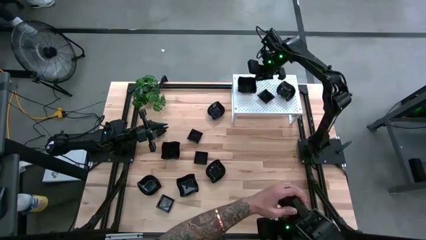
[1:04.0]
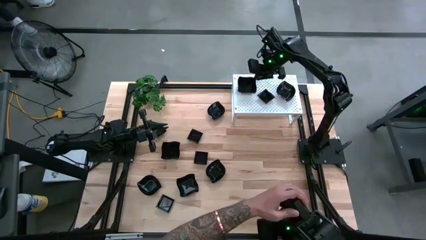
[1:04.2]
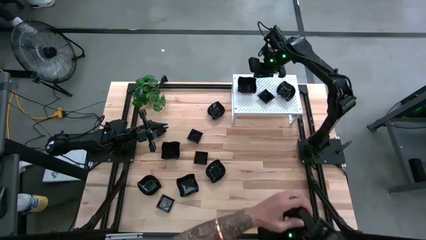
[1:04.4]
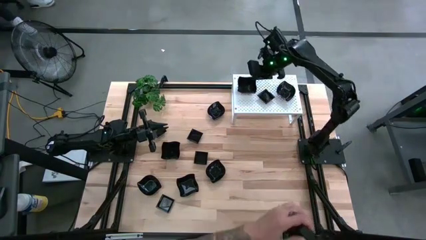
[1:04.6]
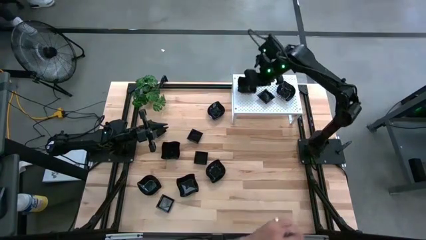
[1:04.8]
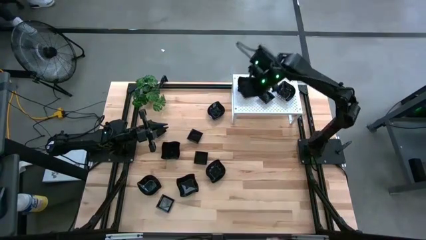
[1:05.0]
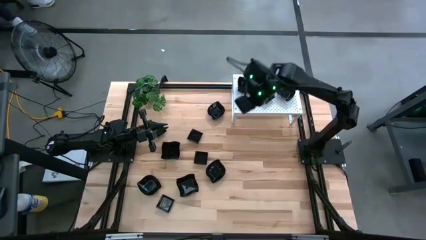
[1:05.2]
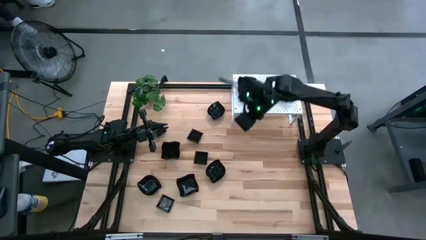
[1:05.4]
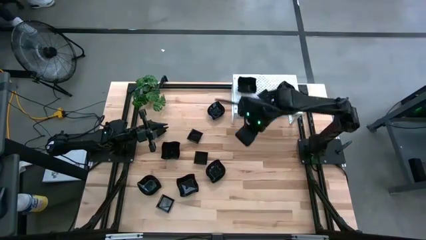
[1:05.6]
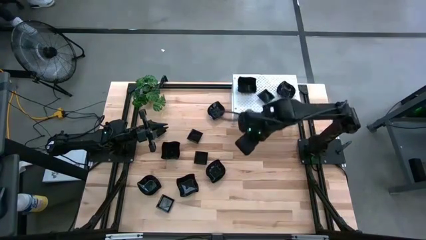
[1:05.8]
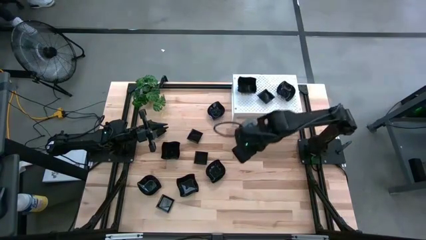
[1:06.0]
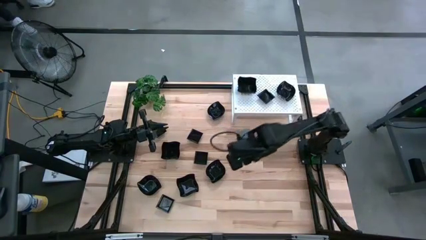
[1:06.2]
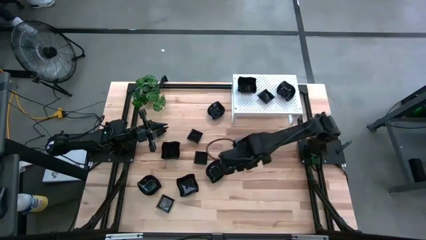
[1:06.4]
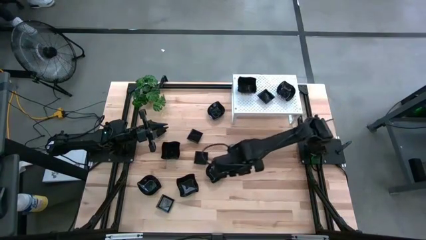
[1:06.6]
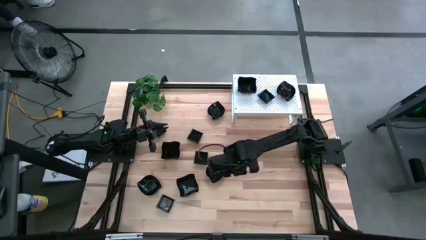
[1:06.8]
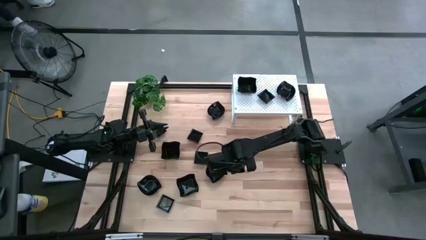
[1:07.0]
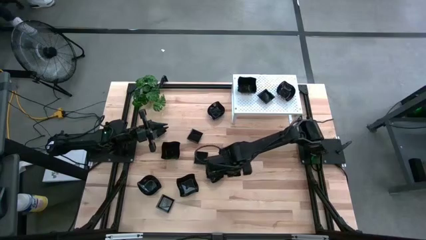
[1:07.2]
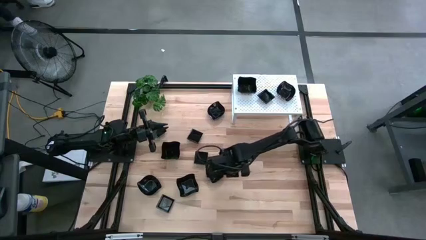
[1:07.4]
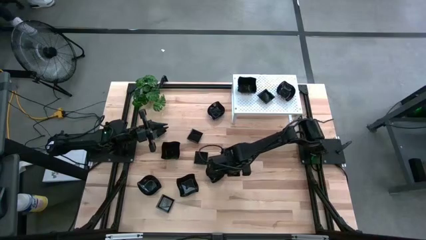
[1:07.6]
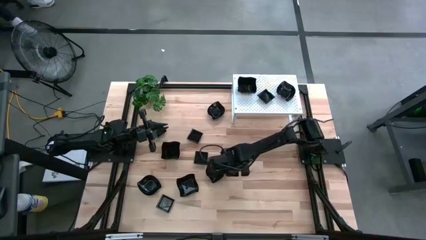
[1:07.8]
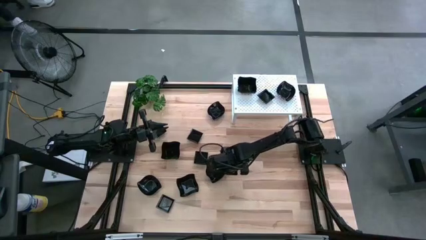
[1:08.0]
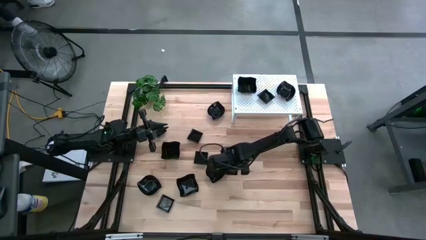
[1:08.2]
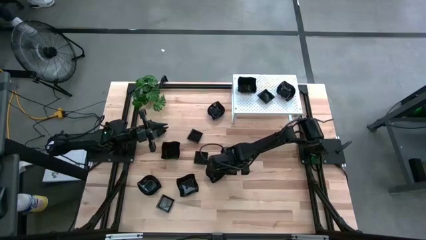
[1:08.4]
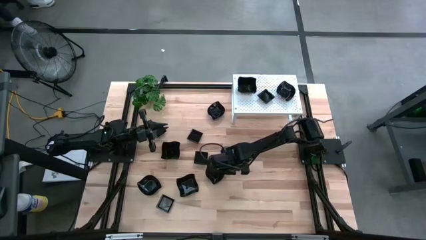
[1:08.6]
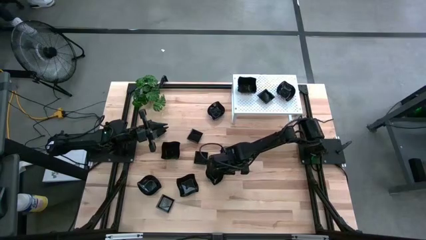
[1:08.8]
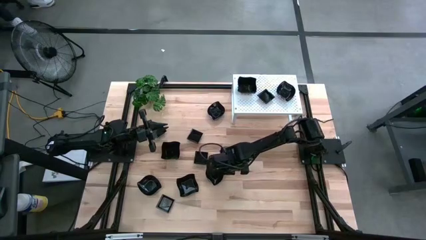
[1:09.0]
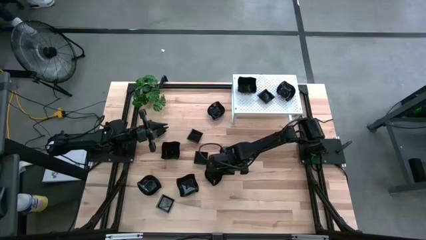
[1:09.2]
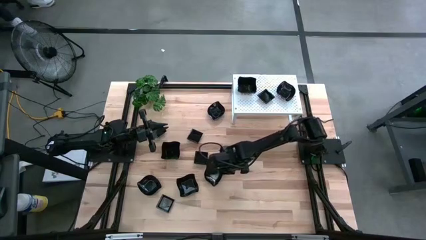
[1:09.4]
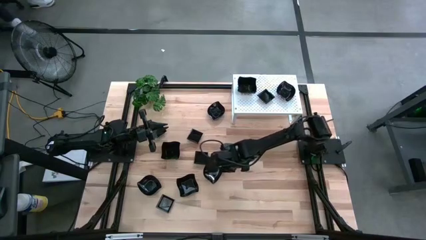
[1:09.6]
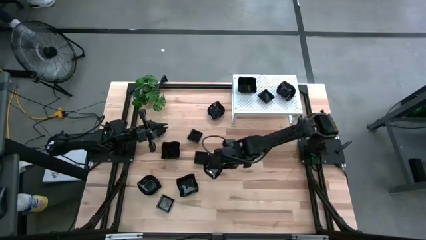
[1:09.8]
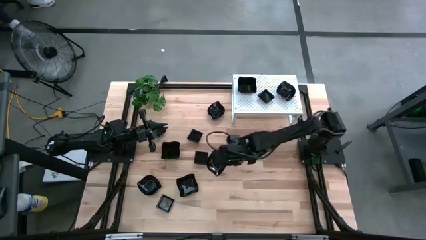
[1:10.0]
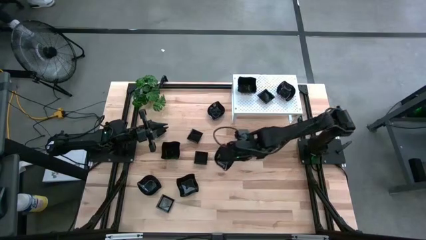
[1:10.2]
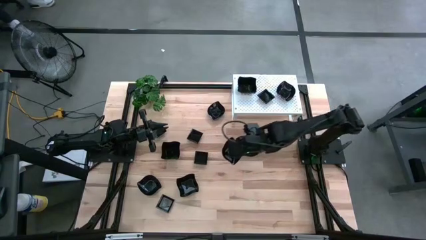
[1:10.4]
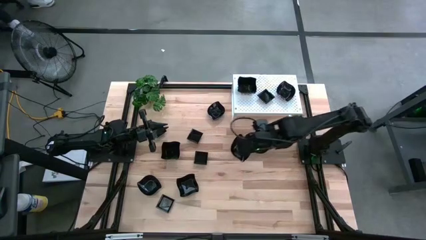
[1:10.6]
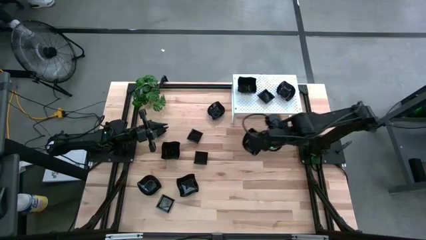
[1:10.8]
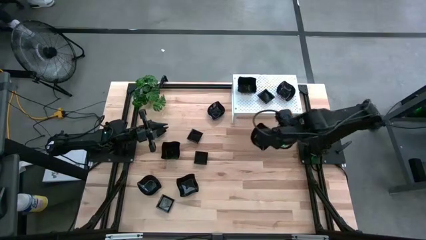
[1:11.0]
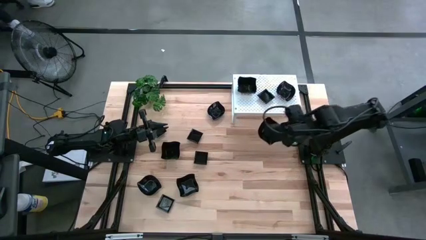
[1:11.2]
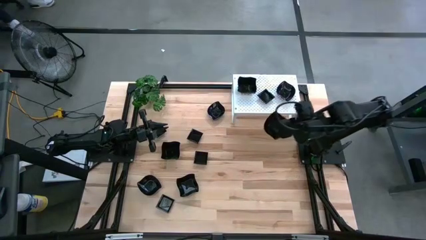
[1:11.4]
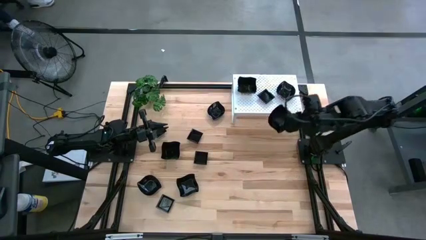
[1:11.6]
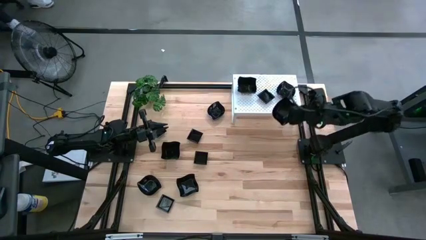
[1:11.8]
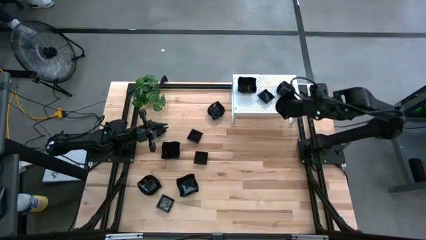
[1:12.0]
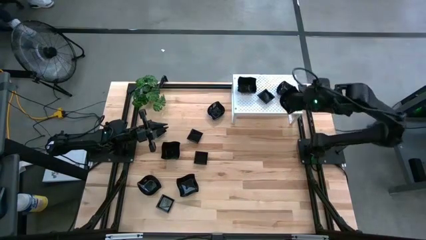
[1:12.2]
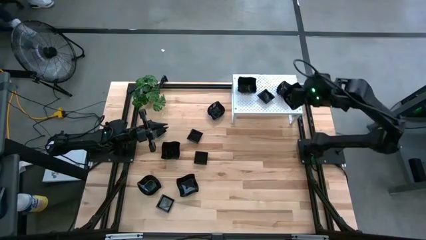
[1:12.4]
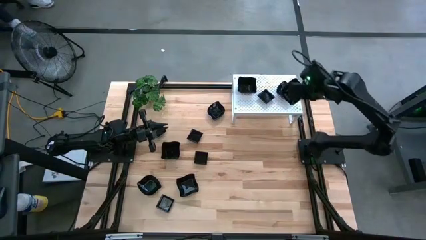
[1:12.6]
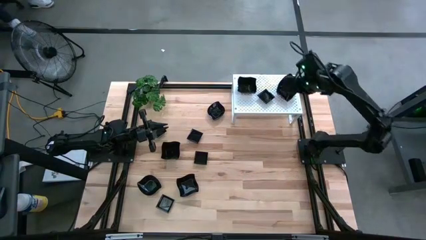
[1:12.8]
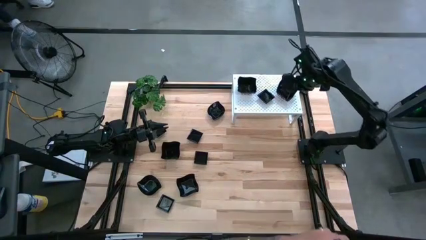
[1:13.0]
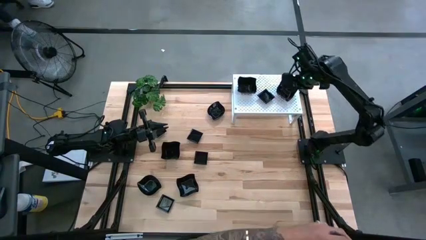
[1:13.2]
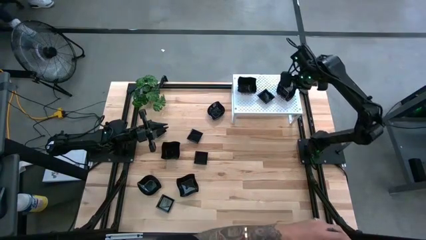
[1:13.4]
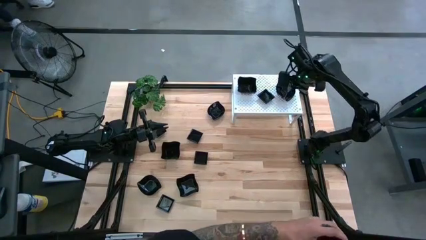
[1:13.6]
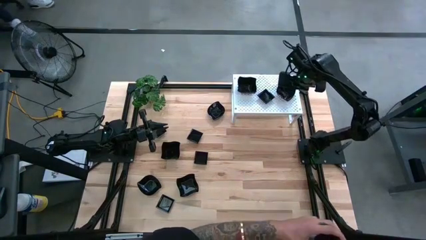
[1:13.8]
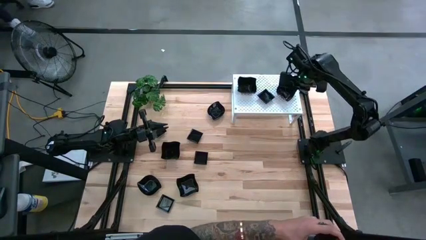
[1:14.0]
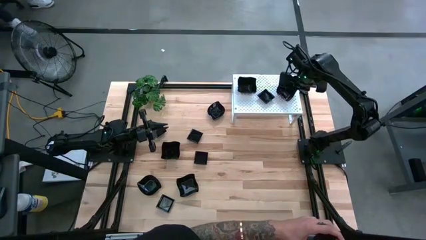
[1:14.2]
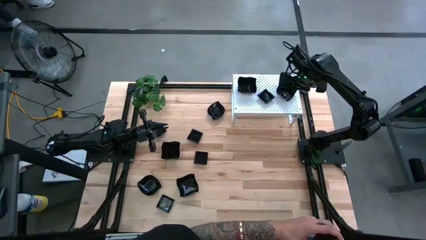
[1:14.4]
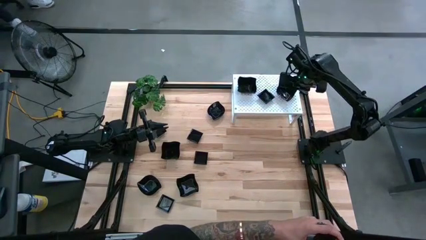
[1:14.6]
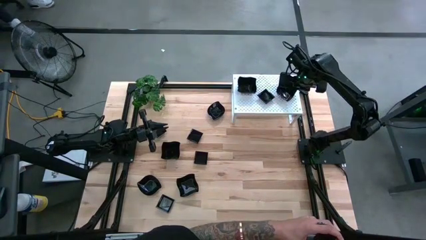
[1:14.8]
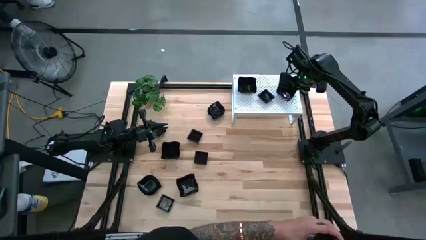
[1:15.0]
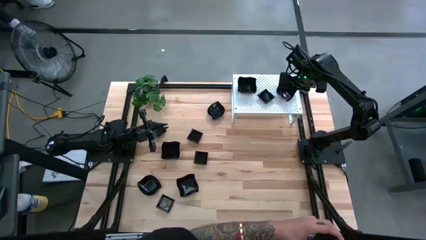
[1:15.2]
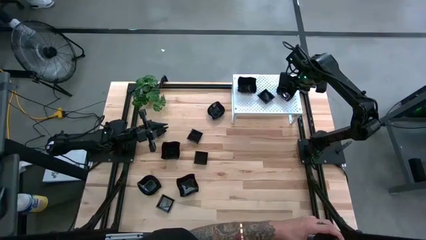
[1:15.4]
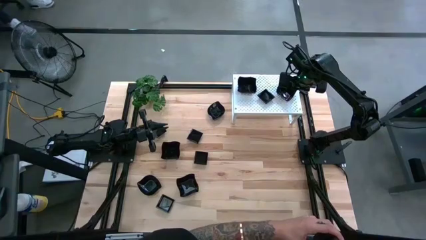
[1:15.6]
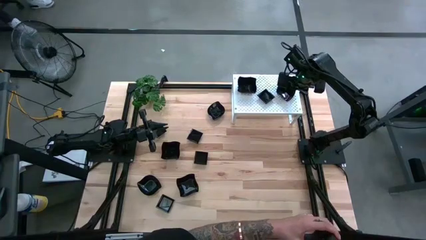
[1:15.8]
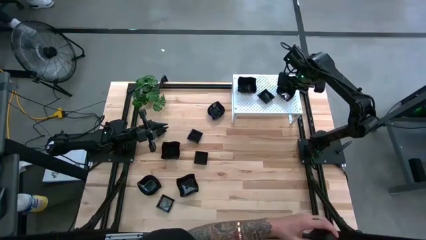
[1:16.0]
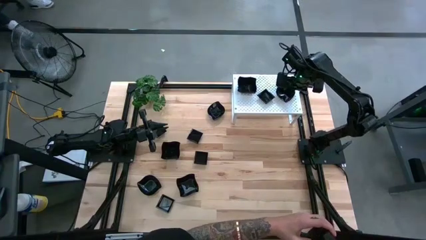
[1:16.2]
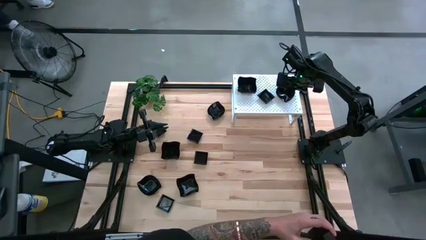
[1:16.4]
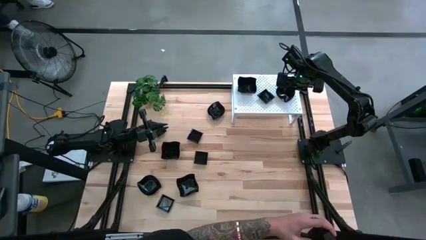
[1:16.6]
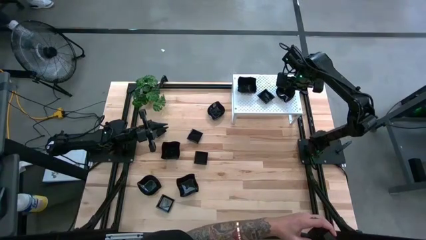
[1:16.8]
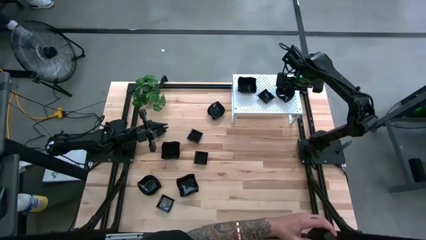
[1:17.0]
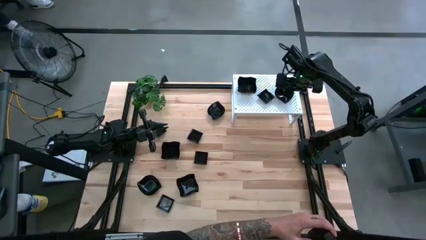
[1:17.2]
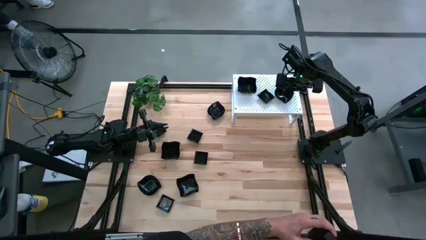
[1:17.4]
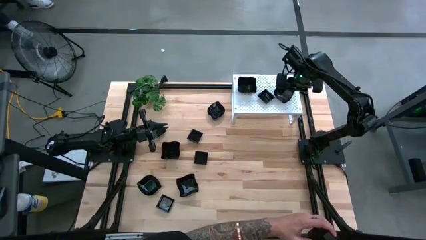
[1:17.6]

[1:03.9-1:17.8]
Task: Pick & Place Mini shaped plates
Stack the leaf-shaped plate on top of the leaf-shaped plate on the shelf

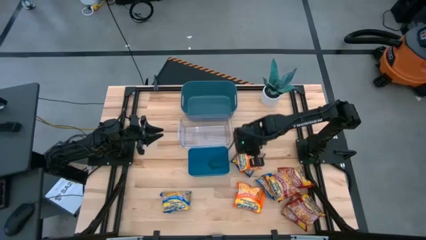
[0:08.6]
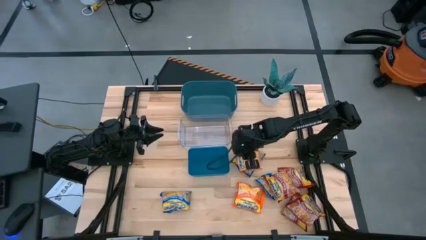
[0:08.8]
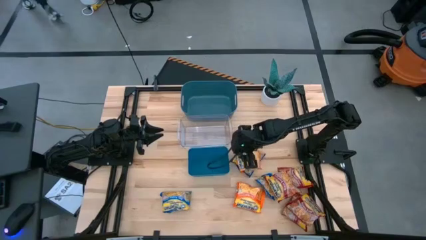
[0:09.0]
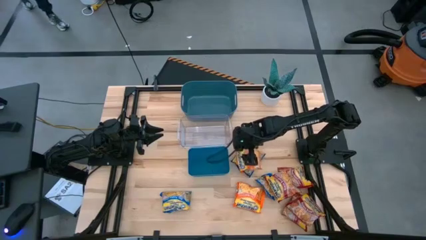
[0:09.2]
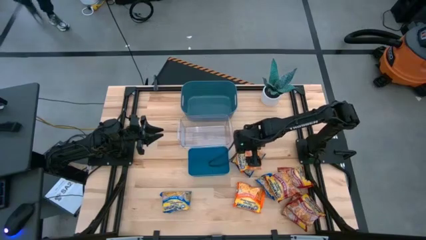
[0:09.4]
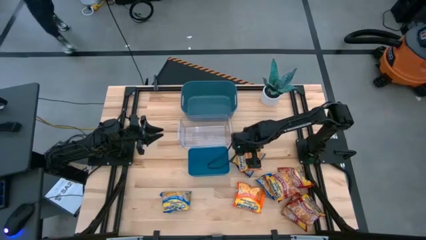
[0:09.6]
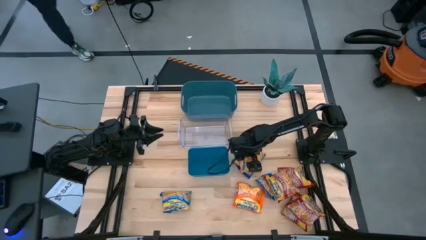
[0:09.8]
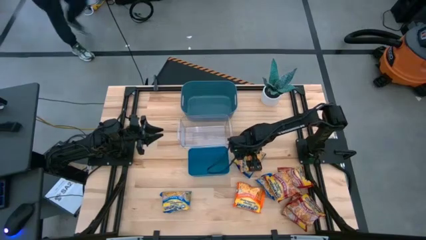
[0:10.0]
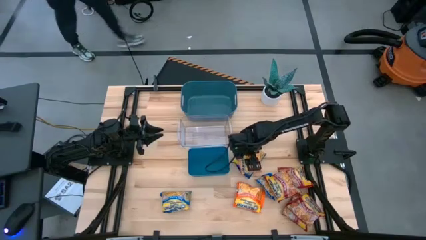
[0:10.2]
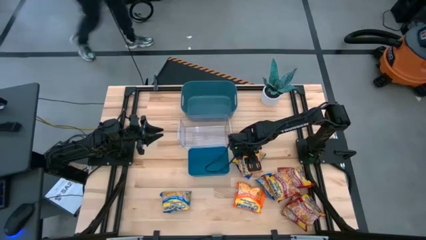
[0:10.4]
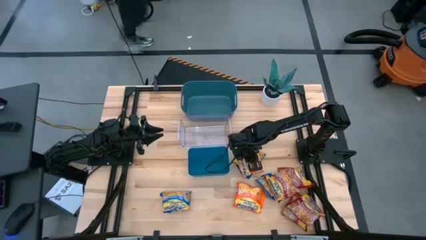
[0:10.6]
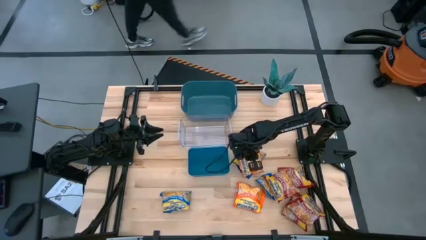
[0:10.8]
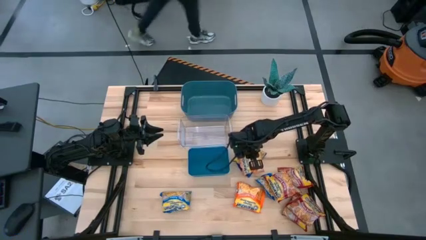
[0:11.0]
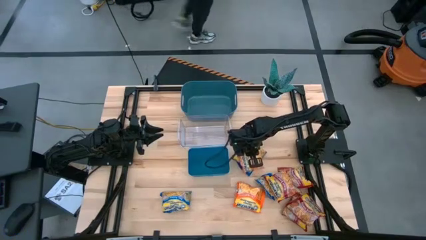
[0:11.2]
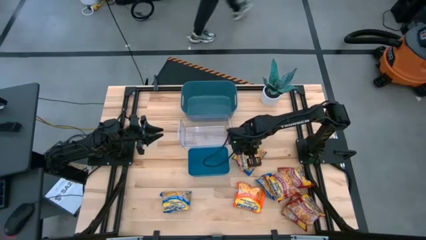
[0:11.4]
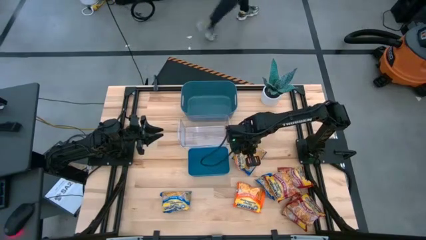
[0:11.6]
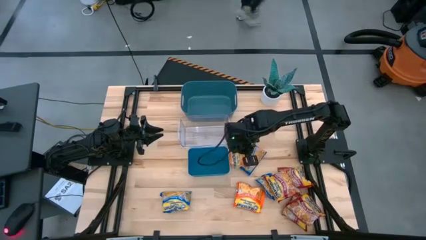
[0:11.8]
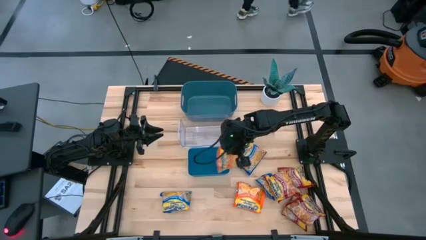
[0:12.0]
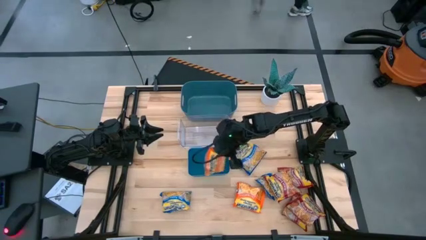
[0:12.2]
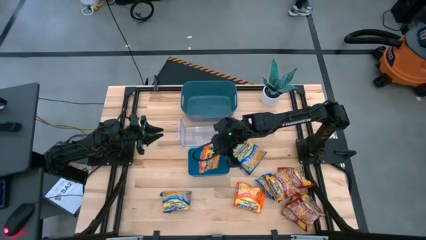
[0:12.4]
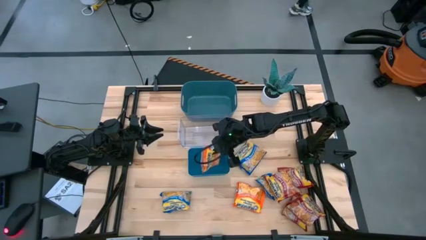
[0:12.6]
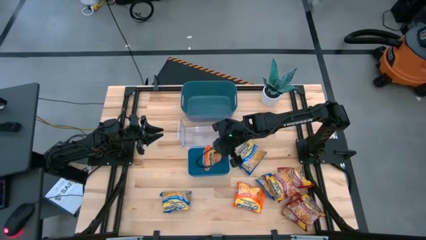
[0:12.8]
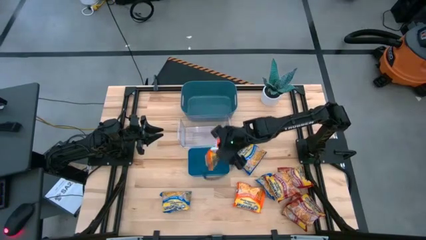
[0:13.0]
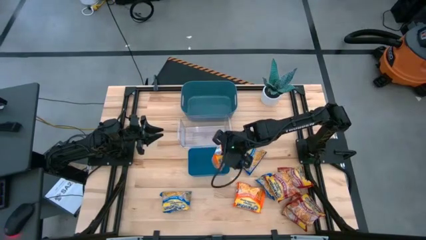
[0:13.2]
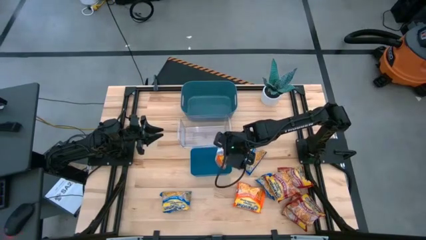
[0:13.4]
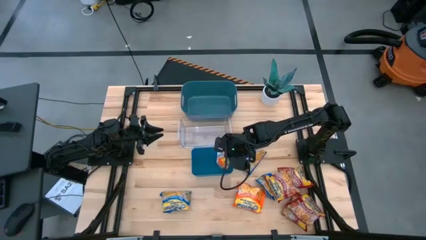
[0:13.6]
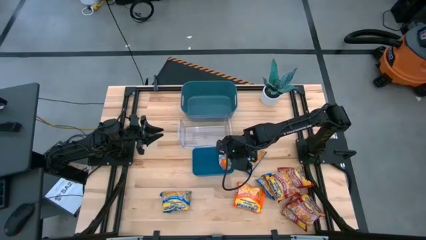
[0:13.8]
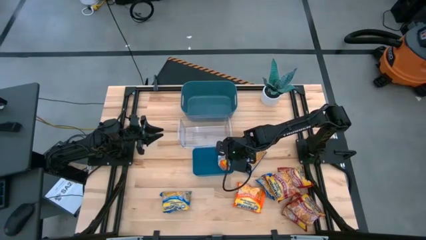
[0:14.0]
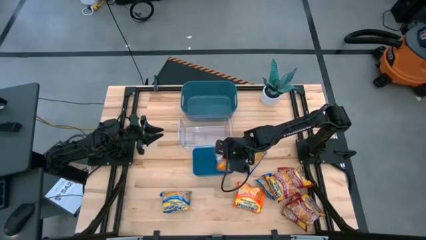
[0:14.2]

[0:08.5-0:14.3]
Task: Sort Maruchan noodles
Put the top orange noodle pack into the bottom blue bin
